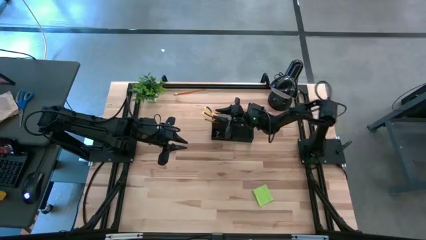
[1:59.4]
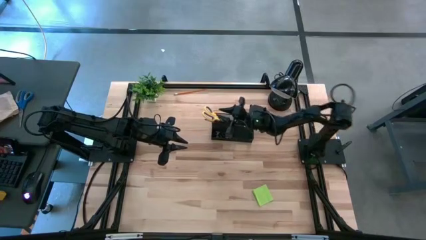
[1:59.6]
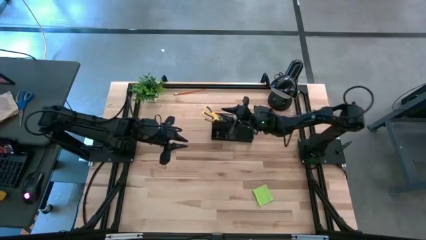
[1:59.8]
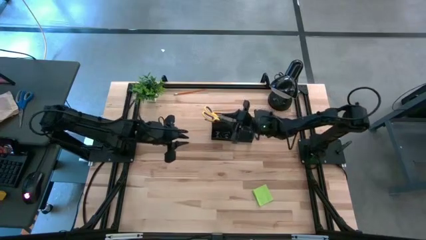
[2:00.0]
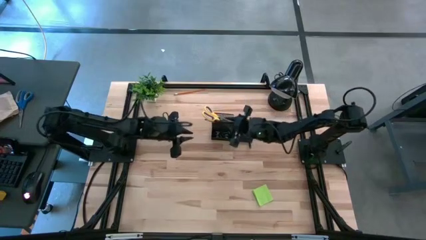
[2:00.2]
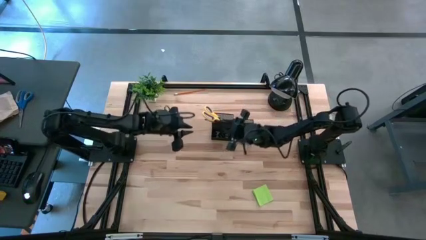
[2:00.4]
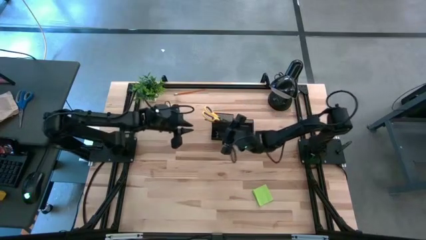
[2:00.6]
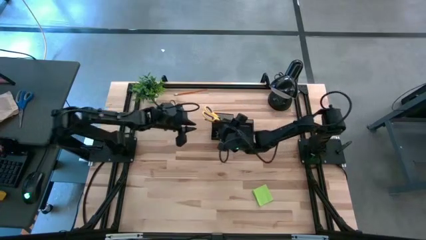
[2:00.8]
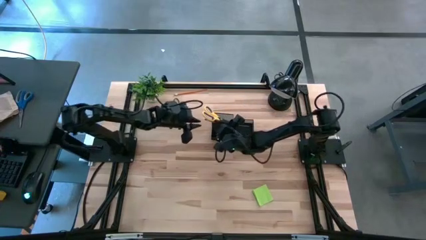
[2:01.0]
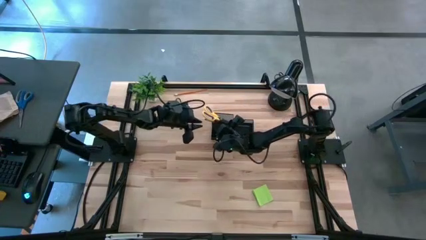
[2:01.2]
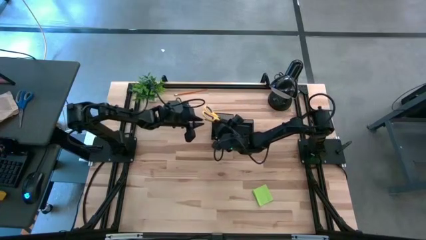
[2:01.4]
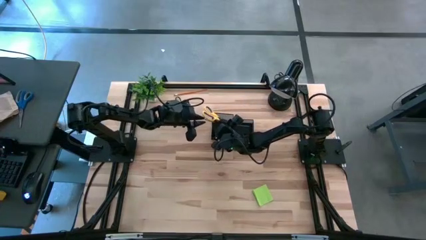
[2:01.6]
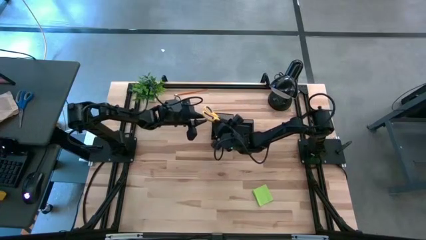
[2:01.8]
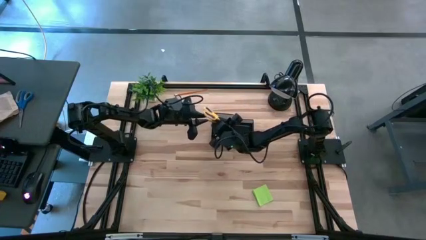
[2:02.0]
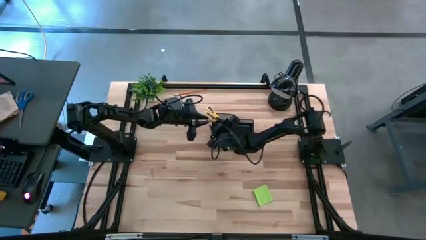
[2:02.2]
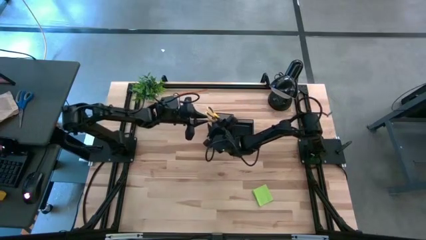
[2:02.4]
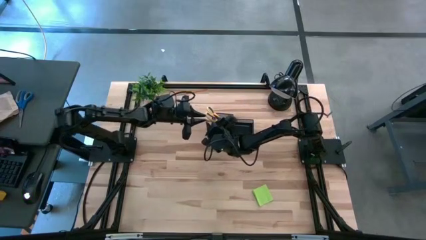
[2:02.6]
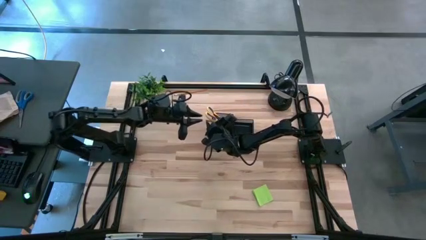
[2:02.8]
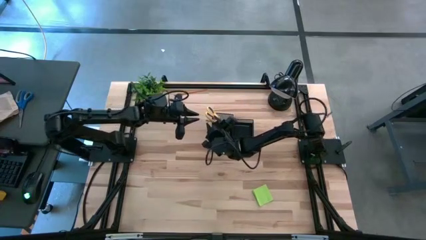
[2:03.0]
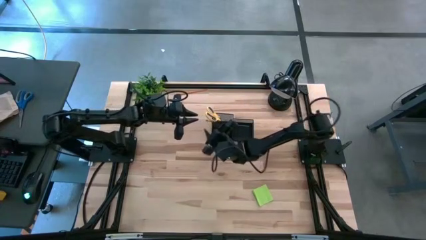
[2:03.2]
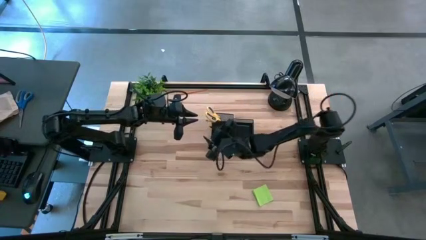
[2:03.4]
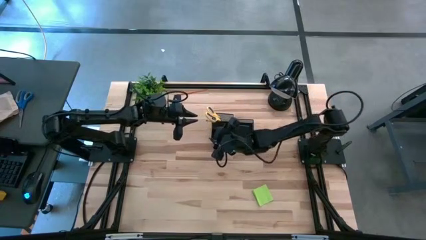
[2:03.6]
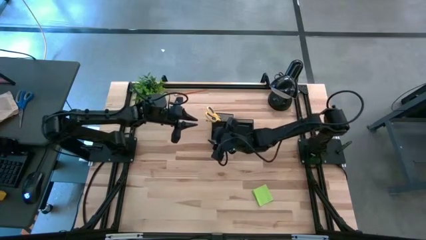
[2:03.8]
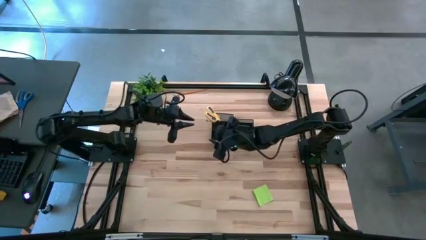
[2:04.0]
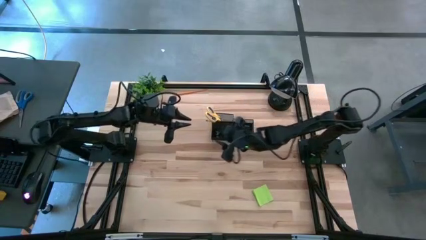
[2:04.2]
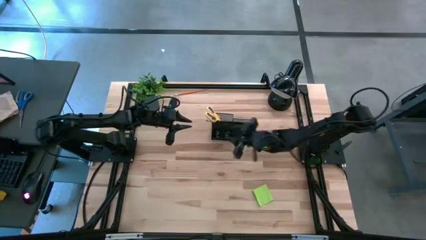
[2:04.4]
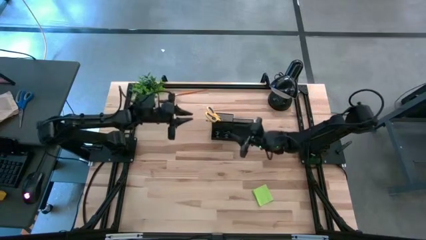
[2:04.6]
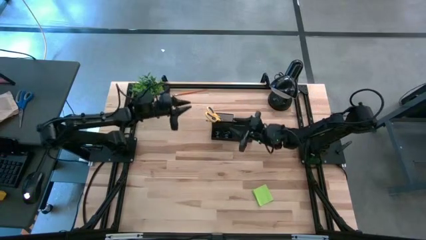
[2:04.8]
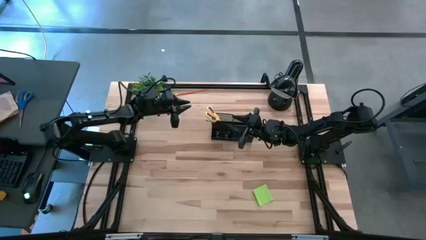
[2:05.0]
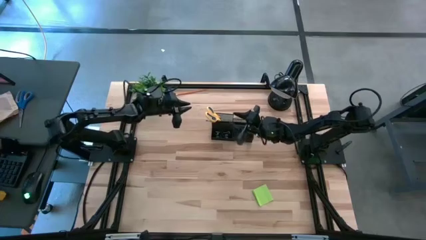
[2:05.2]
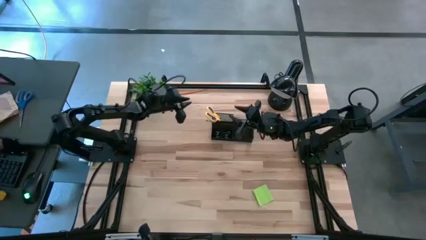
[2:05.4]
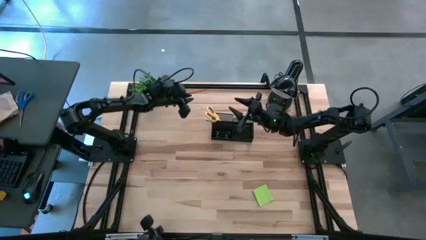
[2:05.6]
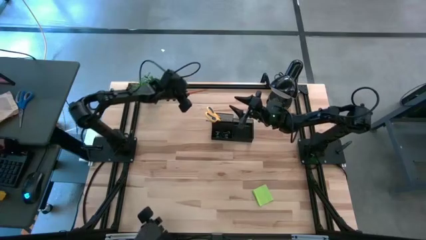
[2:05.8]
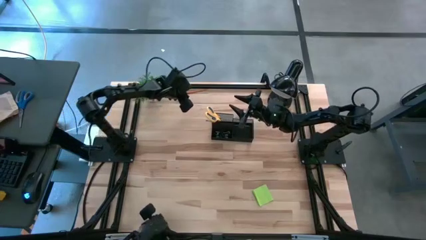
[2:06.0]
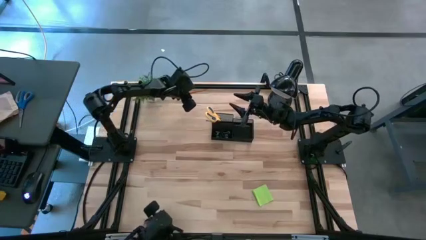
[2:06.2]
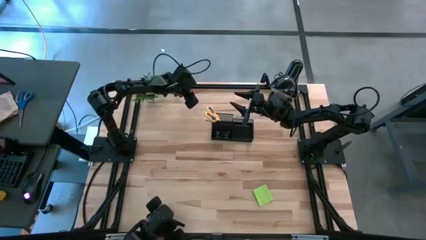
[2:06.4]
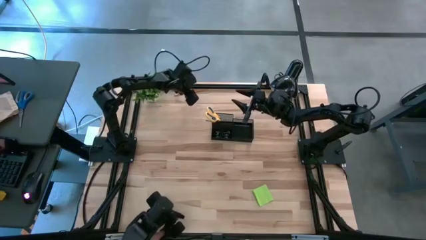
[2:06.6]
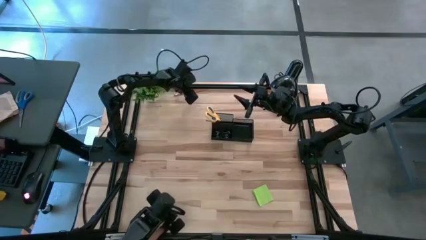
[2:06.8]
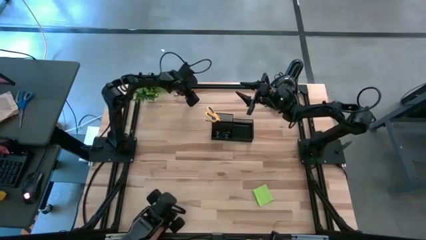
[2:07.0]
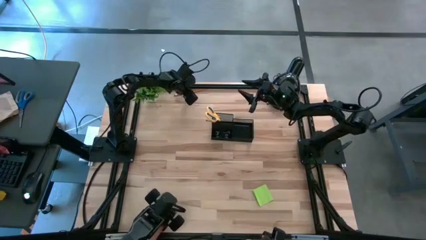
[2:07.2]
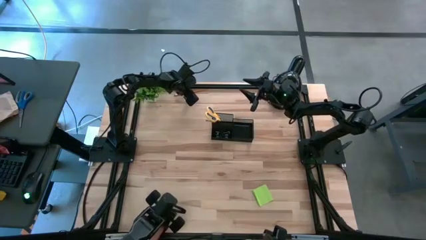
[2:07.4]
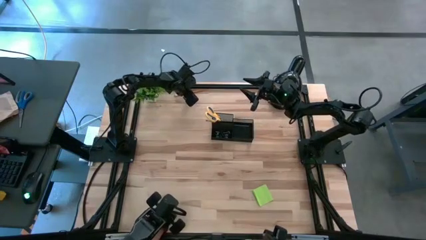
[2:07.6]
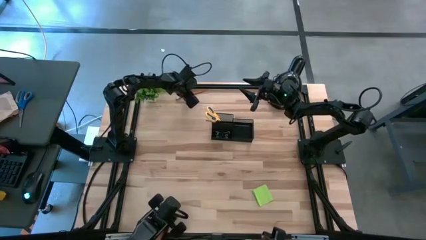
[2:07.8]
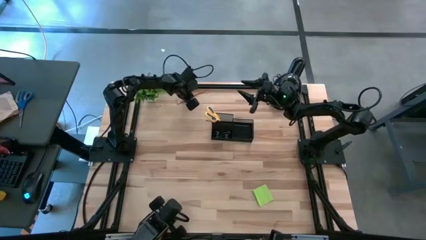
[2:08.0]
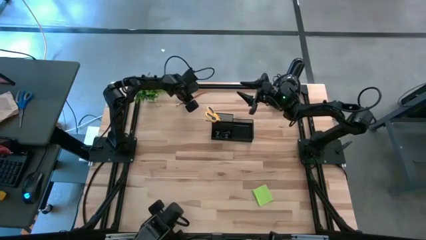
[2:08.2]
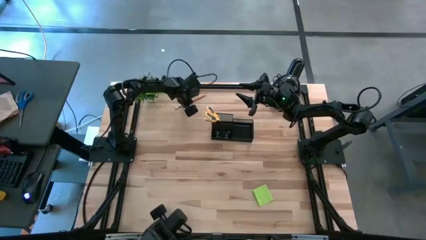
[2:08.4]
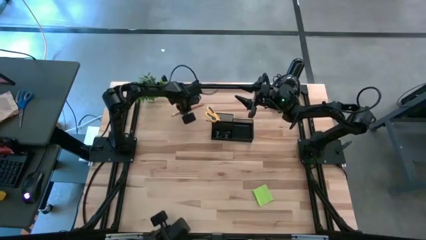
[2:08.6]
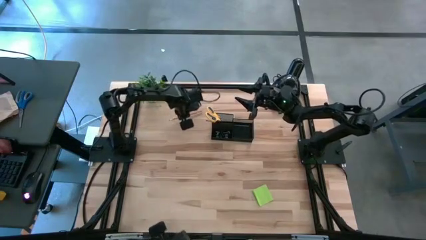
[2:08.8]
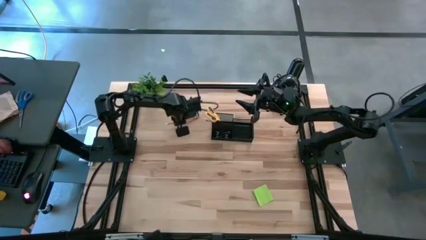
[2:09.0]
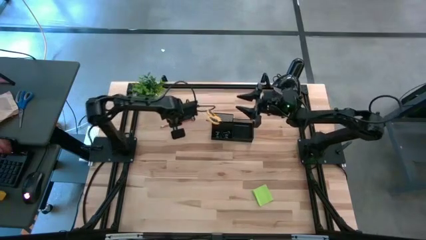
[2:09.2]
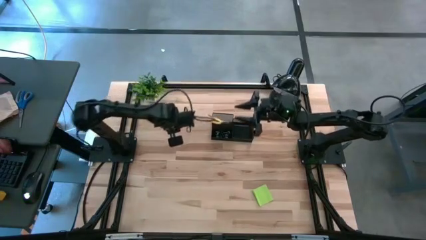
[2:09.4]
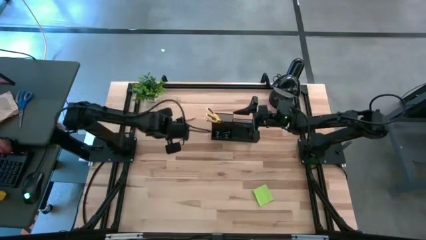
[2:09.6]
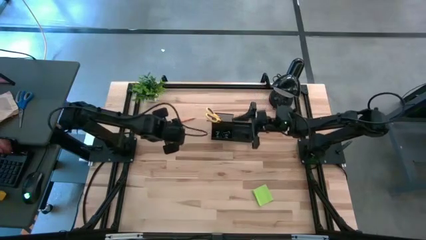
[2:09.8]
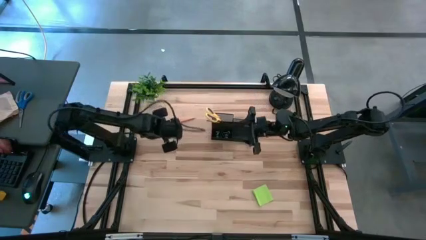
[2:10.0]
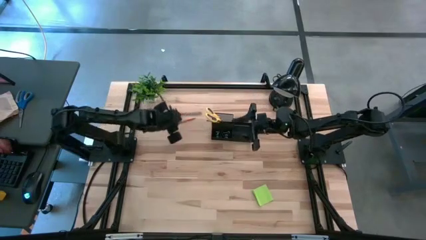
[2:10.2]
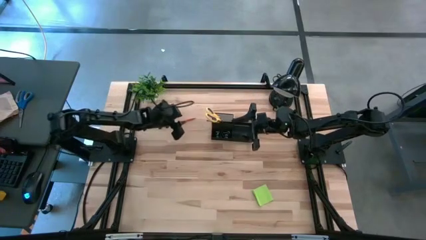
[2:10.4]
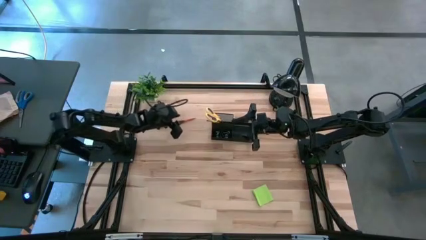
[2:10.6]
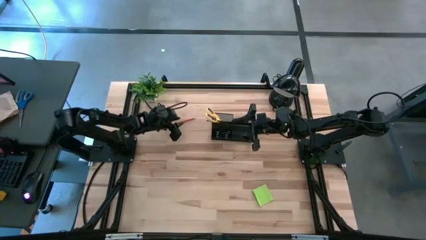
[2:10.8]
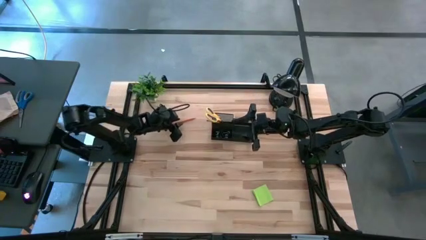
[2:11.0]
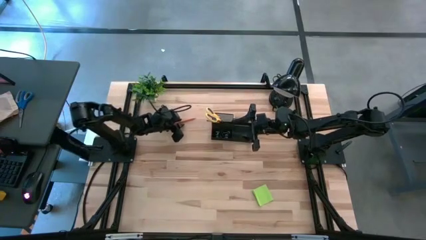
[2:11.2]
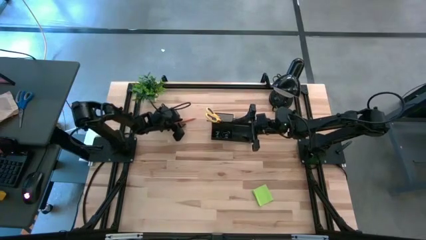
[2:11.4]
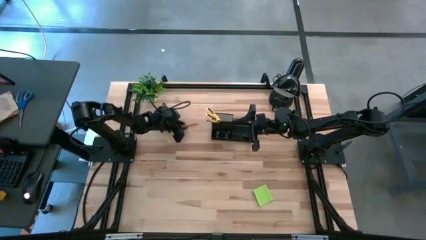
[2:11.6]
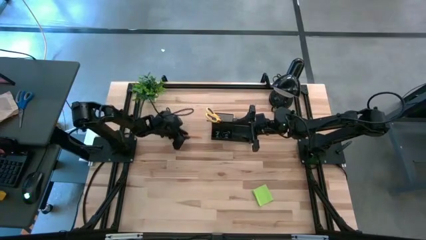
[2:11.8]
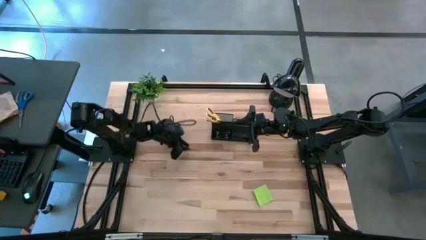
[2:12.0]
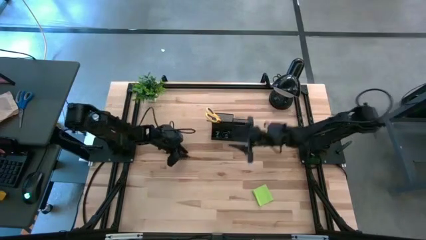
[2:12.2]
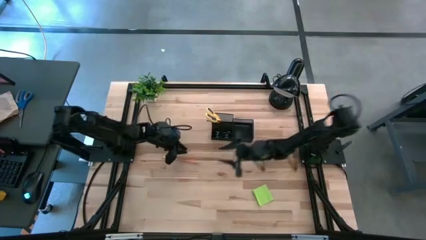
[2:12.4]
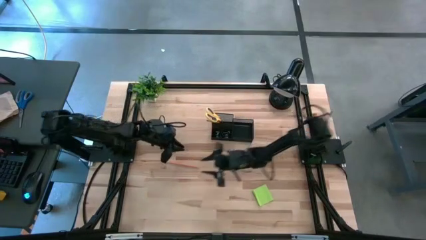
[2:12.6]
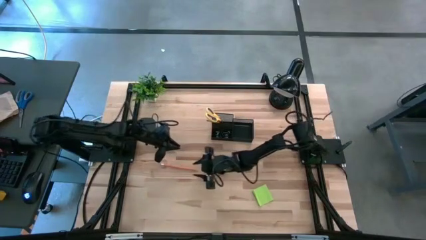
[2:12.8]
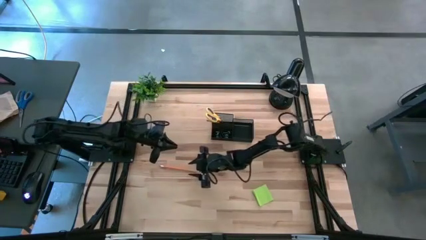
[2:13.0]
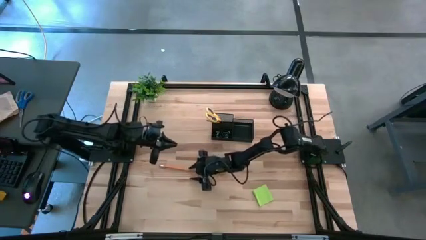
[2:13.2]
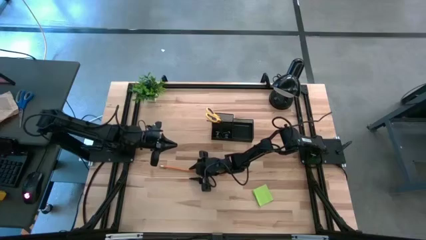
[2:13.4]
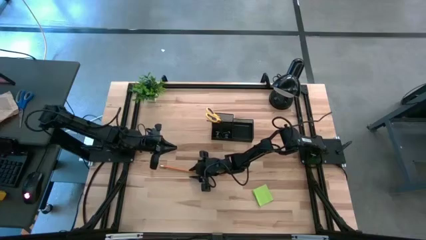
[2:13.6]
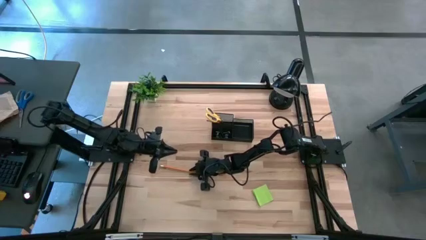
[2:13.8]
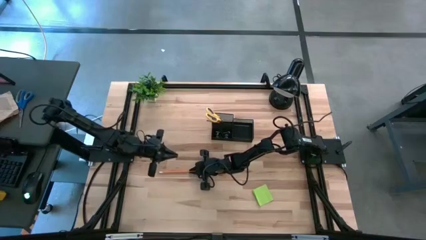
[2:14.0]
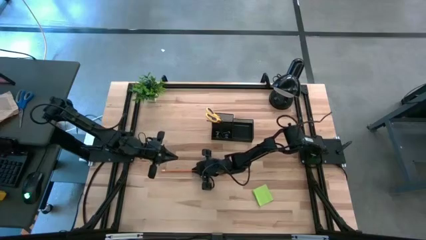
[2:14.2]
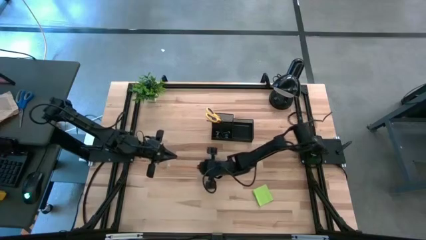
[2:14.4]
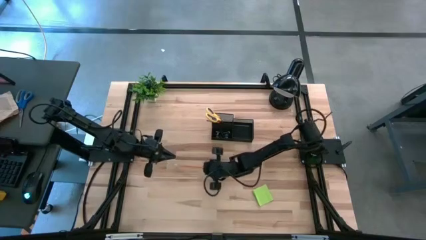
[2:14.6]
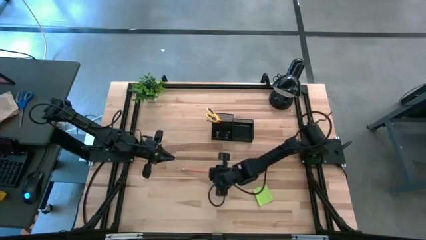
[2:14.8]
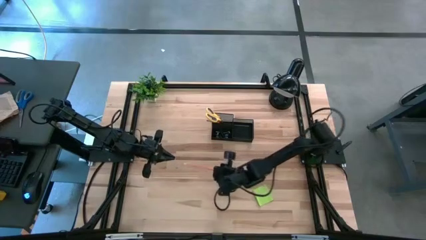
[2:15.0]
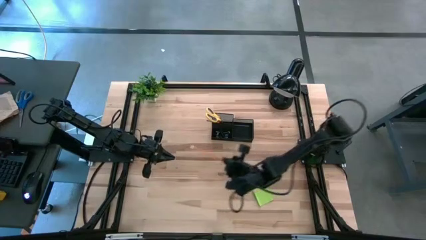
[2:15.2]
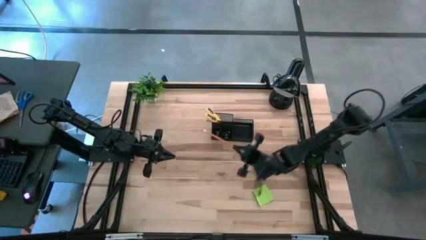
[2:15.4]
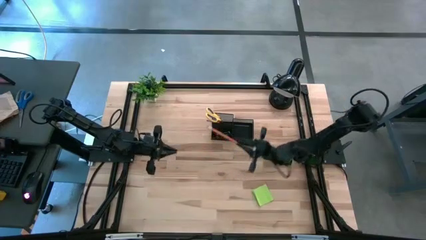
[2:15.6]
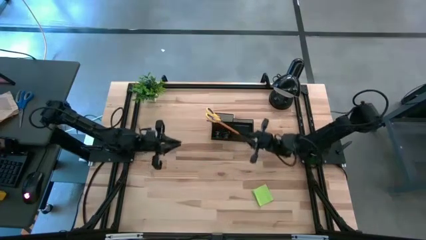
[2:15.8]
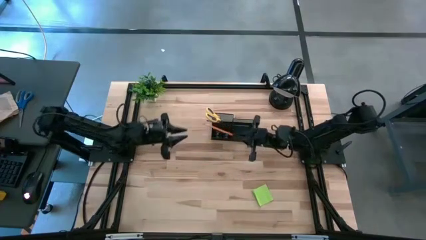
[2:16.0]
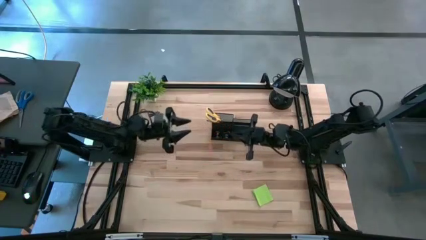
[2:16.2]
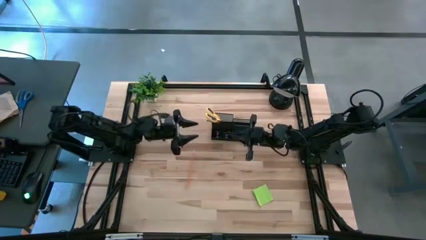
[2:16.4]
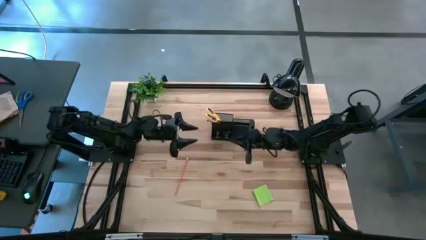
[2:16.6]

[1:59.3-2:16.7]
Task: Pick and place office supplies into organizer
Put the orange pencil into the desk organizer
